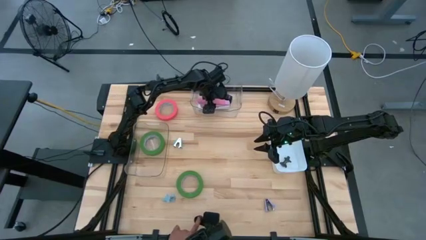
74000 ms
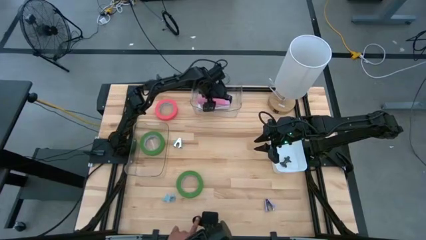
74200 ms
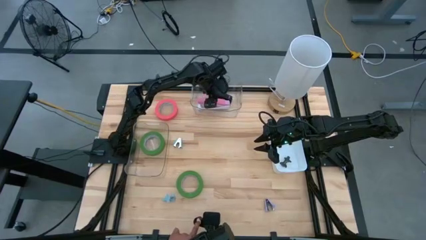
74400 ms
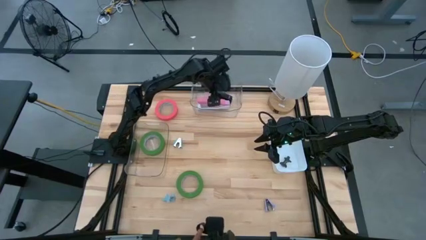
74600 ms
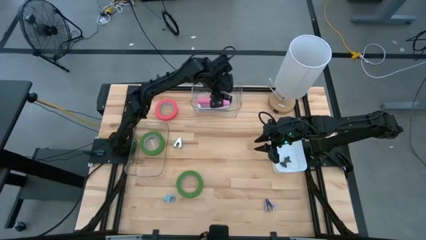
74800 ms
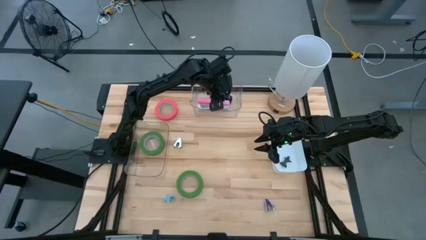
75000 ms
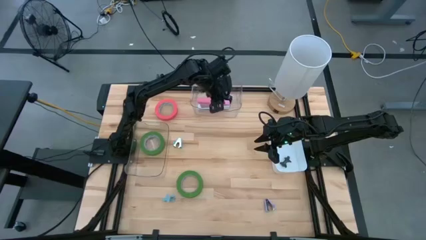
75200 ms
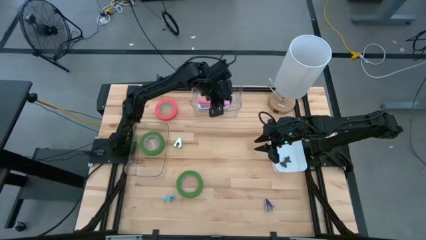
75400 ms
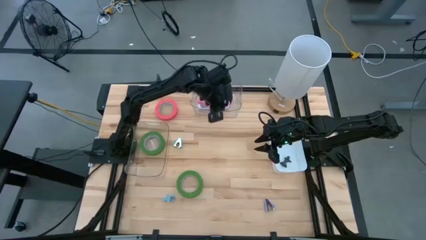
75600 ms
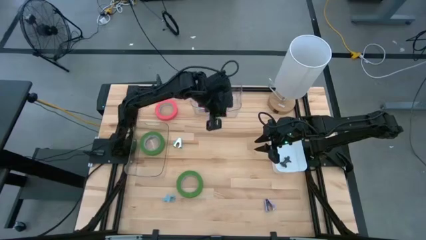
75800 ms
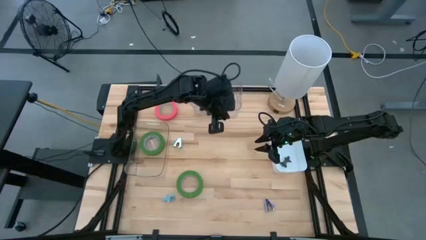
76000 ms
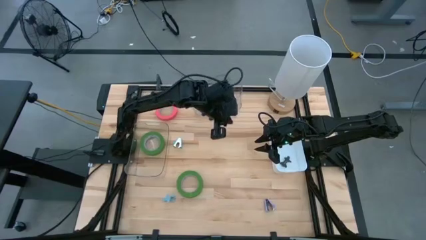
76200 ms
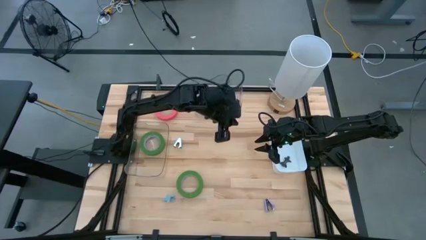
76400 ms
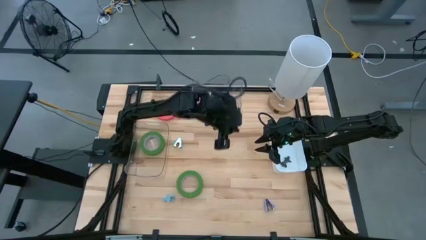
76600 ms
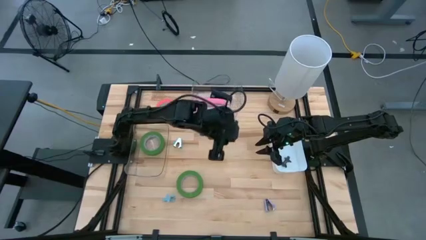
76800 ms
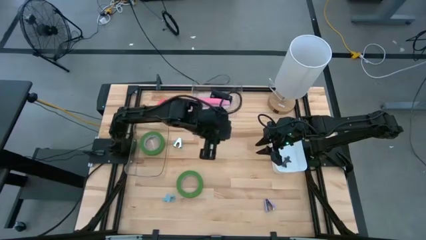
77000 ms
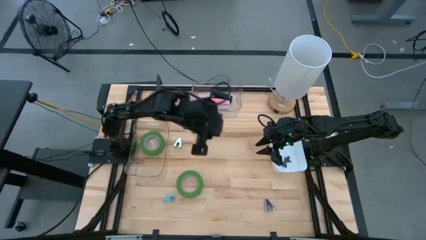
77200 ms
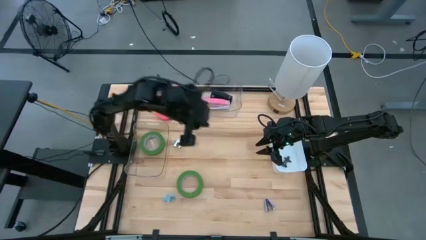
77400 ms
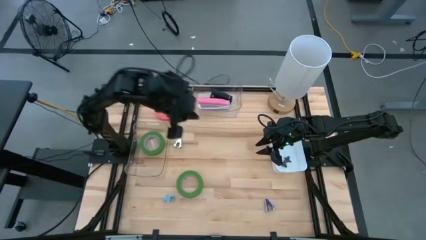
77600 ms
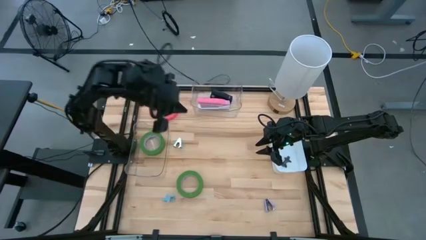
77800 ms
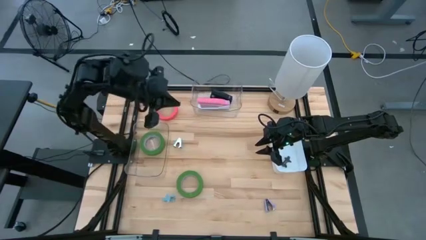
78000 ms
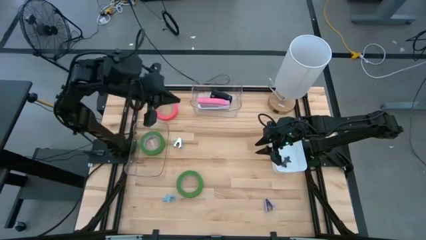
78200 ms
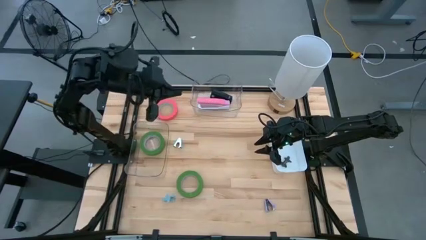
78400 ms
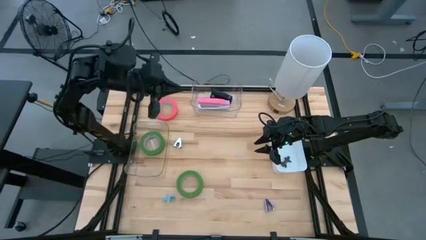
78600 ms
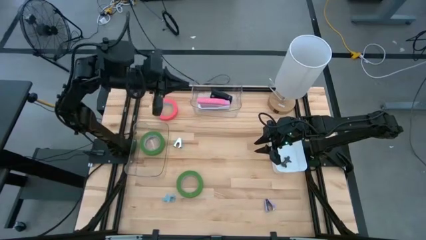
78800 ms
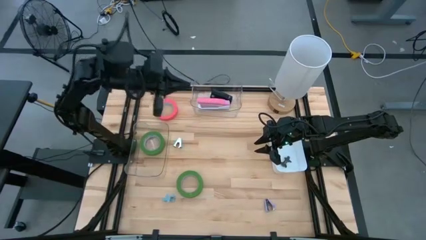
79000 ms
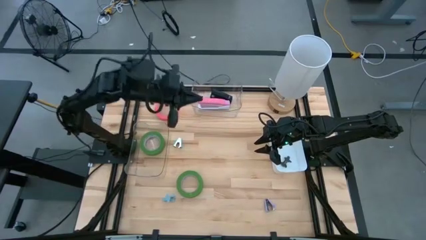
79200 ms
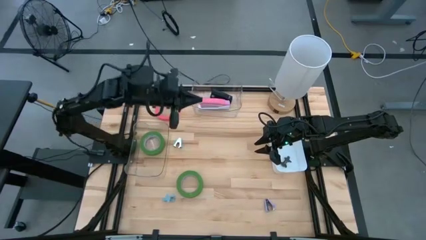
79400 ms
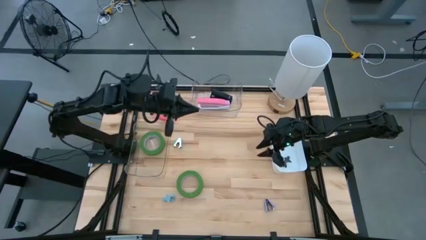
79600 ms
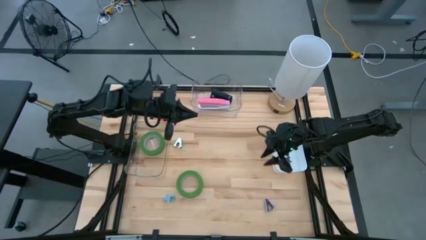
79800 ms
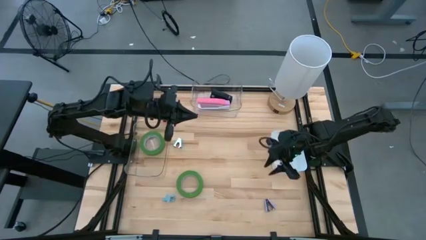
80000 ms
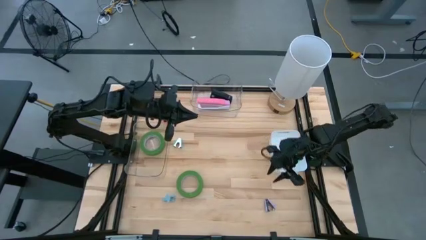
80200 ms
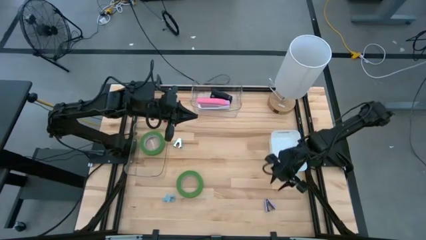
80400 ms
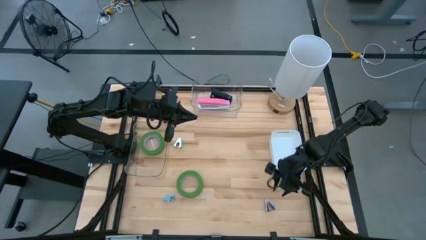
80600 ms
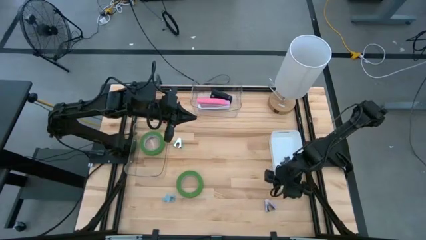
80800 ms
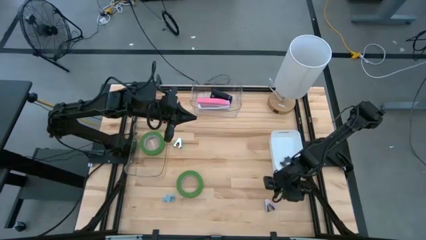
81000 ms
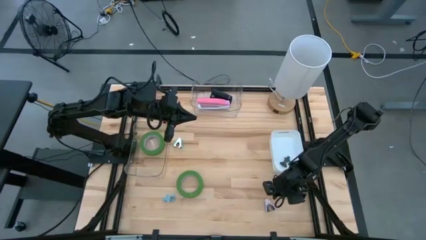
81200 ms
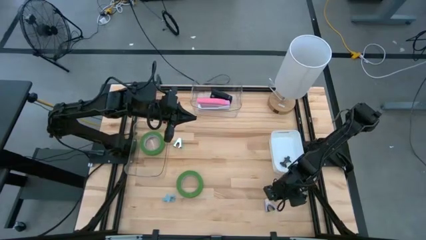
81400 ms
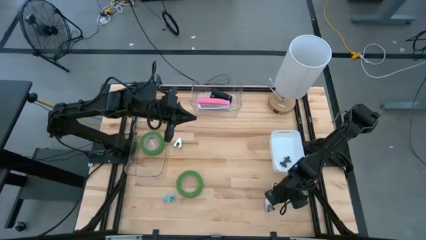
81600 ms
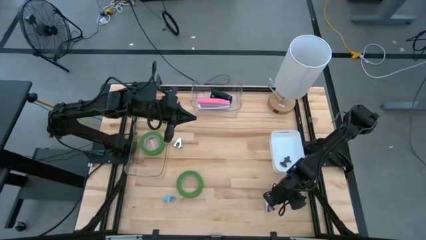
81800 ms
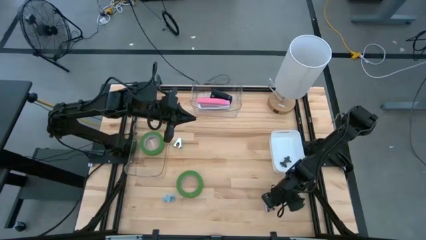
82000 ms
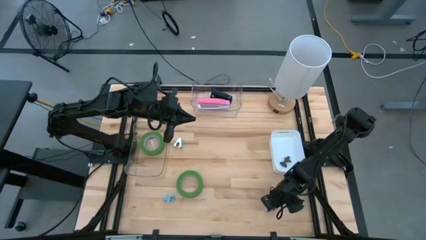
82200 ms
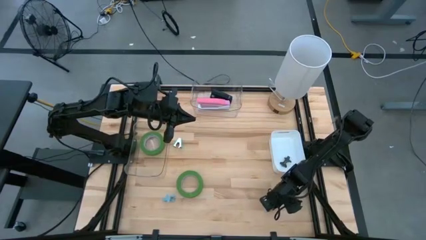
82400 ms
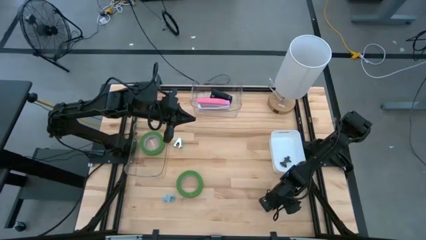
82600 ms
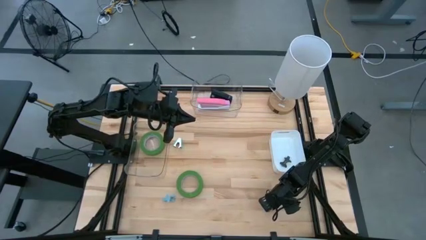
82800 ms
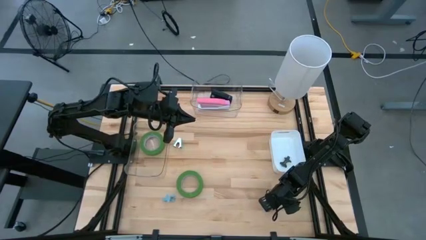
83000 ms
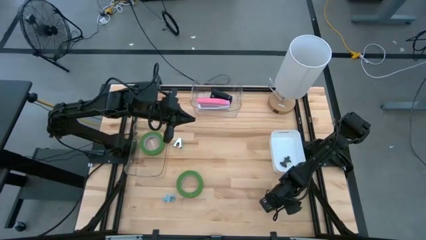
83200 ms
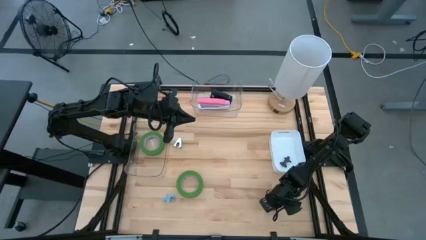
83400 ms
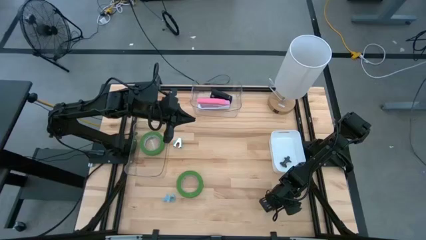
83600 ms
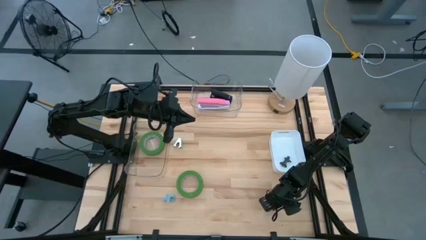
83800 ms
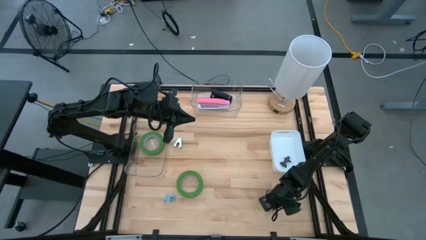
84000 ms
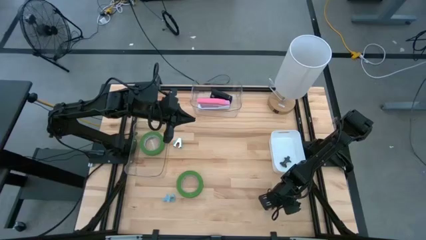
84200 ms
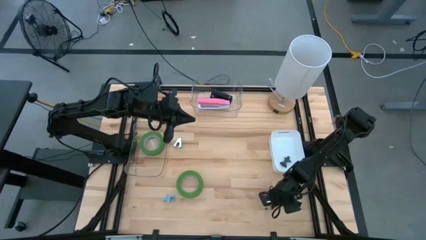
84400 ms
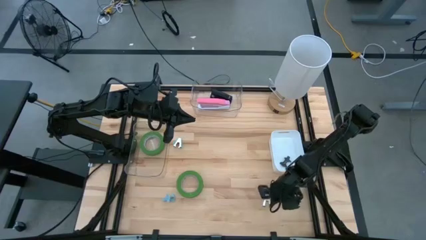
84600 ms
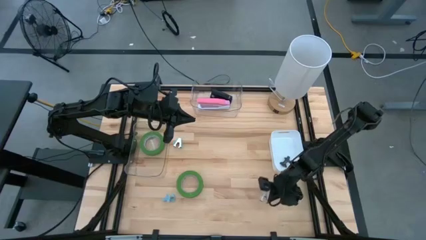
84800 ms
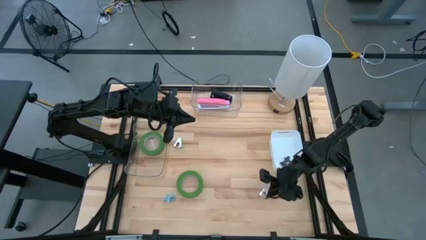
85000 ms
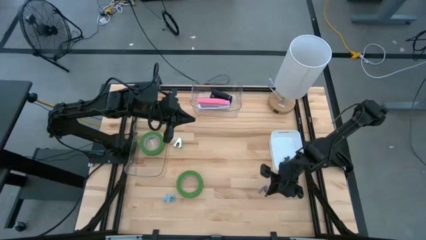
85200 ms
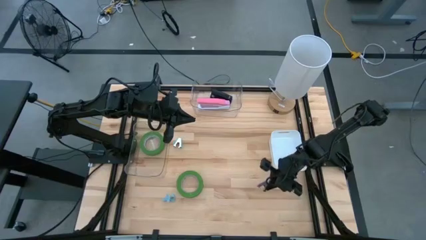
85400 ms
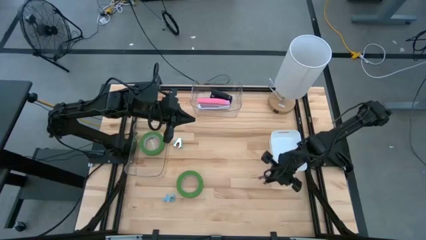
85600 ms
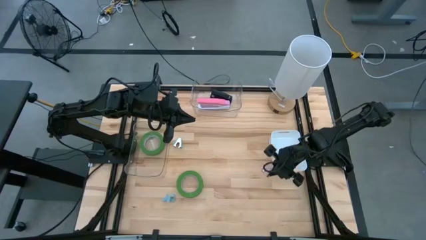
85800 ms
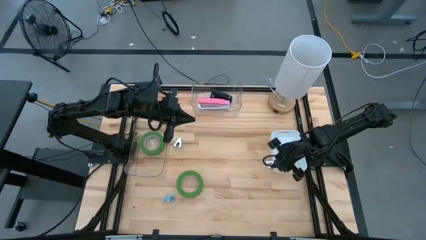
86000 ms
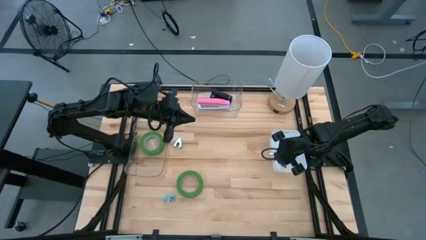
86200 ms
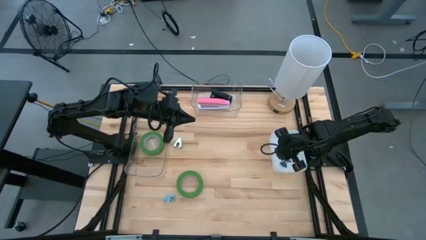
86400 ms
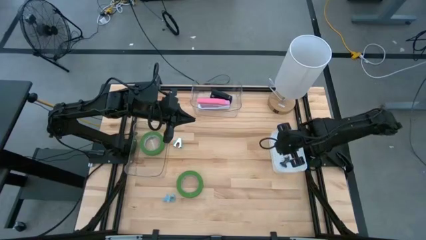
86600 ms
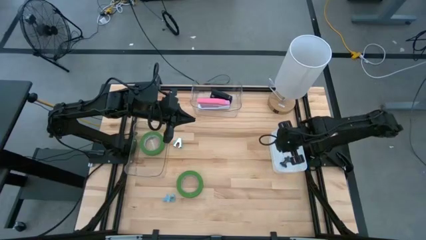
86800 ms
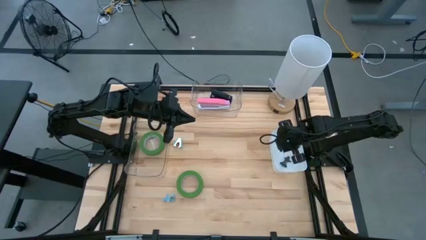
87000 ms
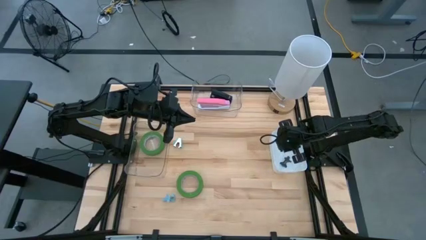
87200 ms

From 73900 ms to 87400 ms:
Task: Pick and place Stapler, Stapler remover, tape
Put the purple staple remover into the white bin

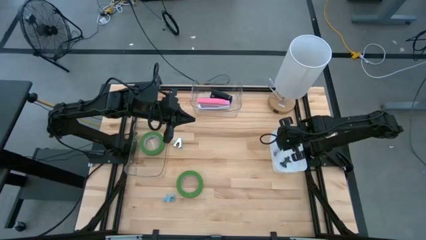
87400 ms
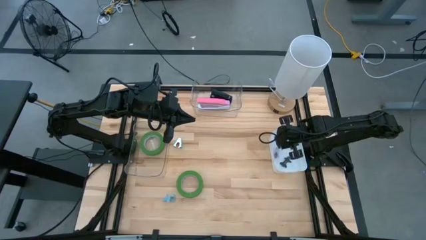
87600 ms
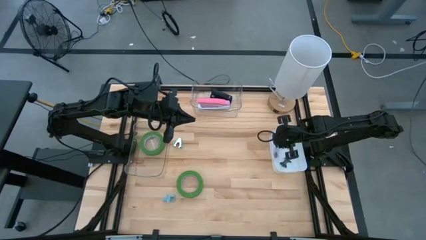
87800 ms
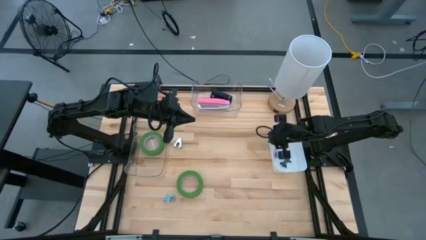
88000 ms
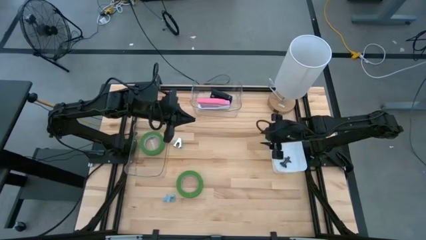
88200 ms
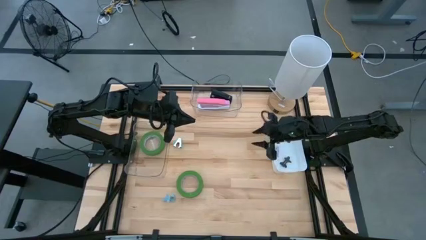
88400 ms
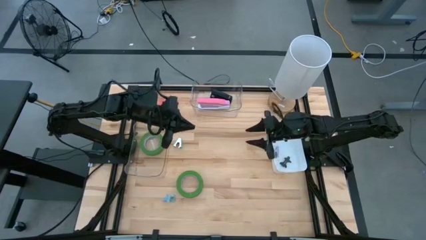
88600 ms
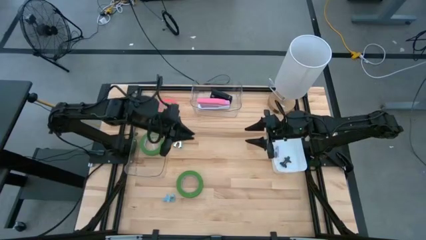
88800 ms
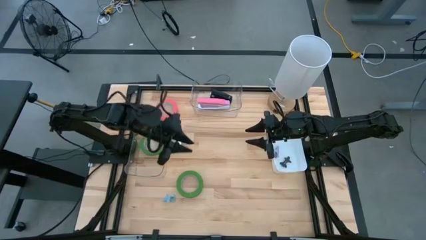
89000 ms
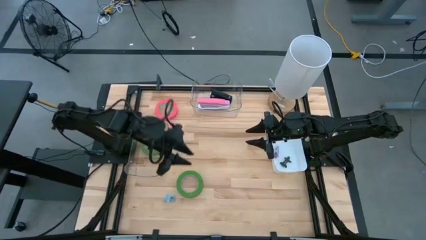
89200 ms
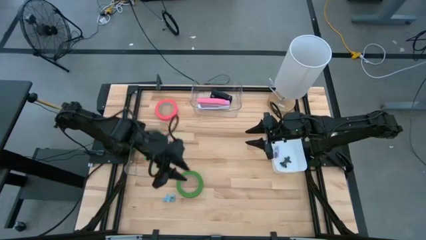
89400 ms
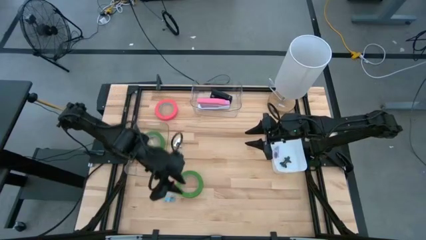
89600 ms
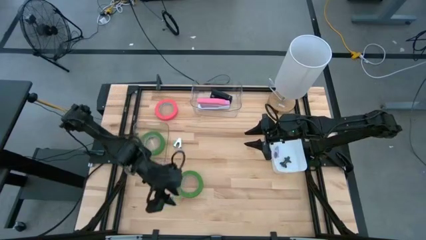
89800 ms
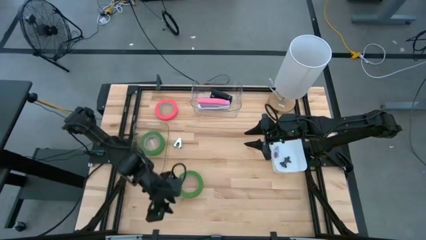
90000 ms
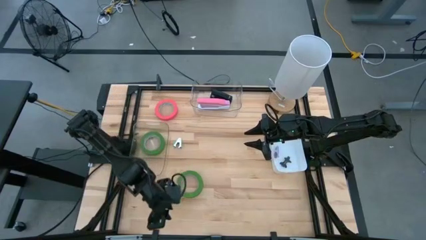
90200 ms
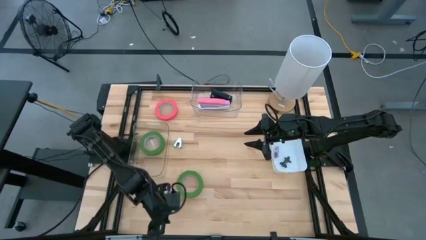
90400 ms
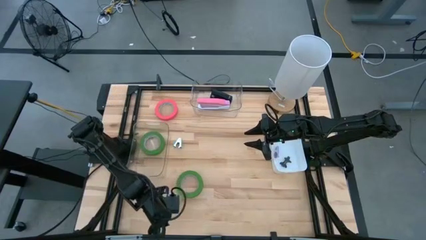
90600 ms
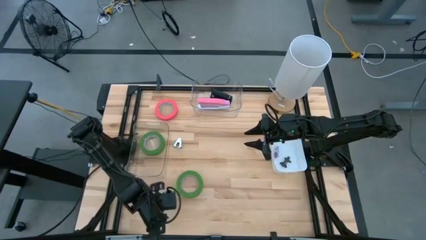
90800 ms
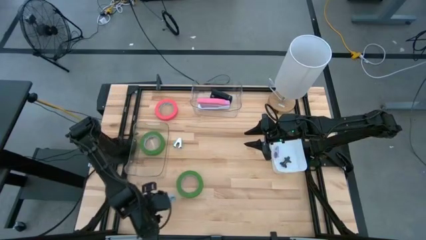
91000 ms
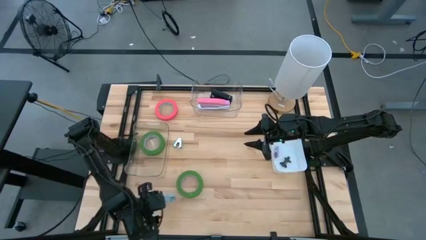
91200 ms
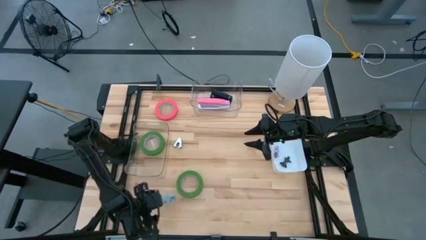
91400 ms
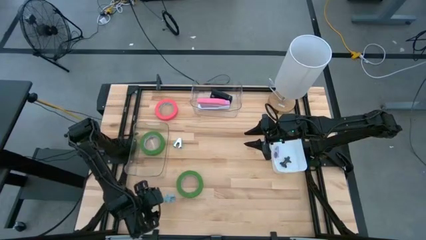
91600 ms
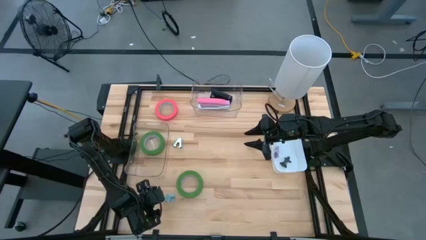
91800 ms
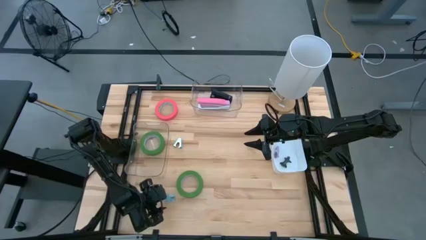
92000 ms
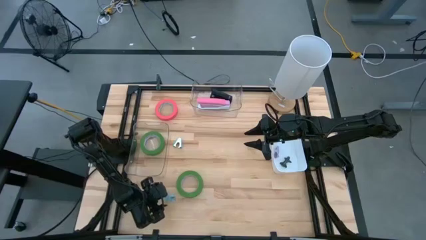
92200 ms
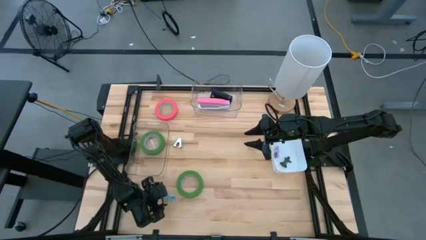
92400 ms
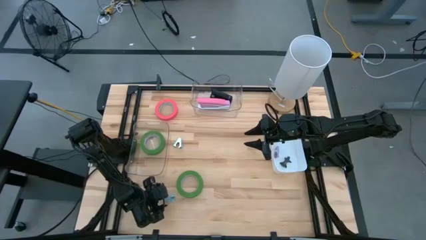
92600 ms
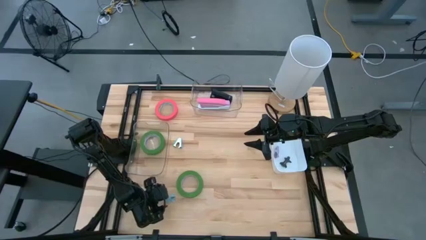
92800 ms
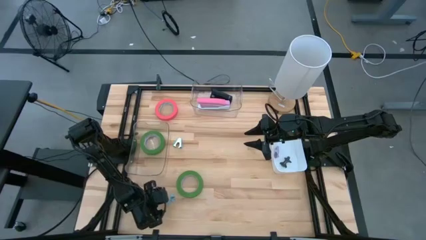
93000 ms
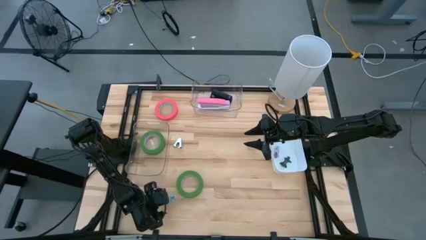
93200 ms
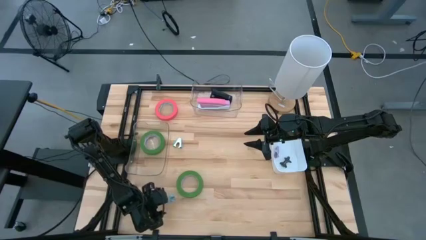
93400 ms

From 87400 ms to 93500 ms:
Put the blue staple remover into the white bin
